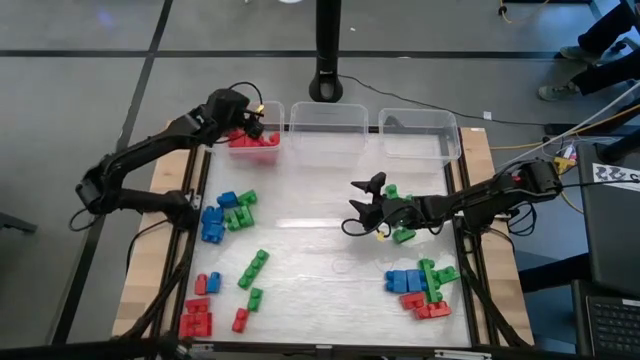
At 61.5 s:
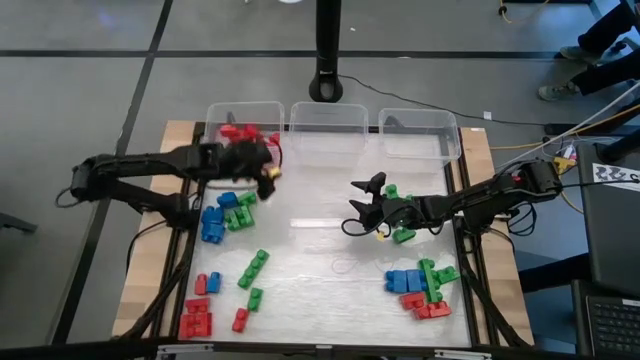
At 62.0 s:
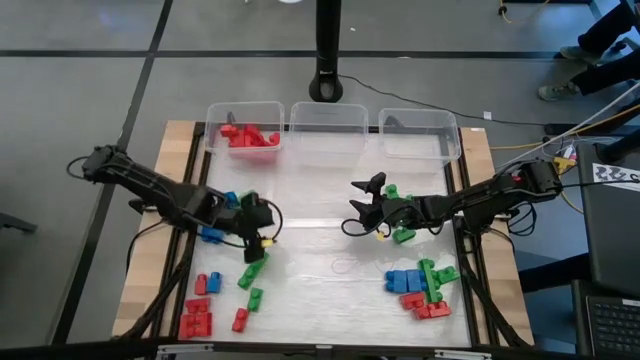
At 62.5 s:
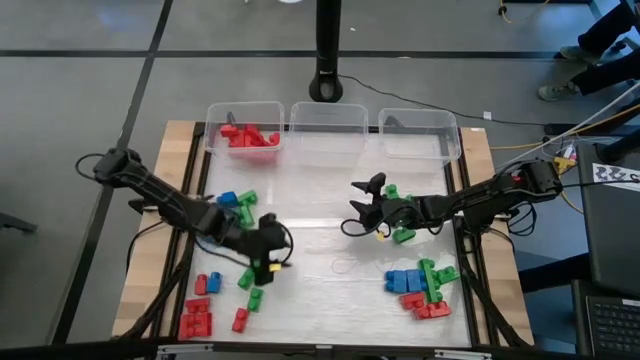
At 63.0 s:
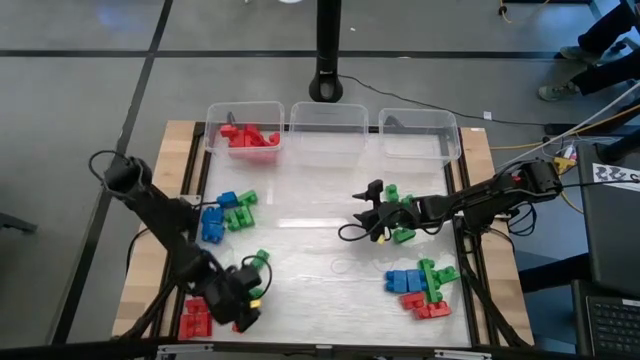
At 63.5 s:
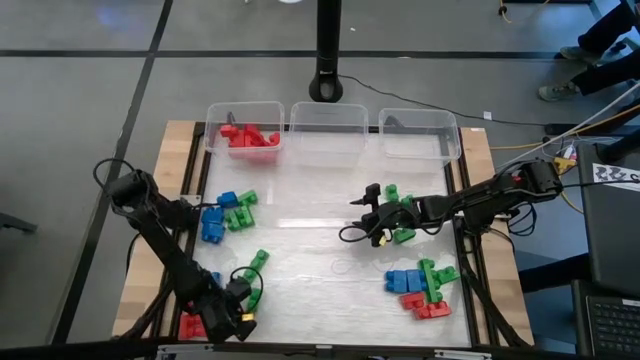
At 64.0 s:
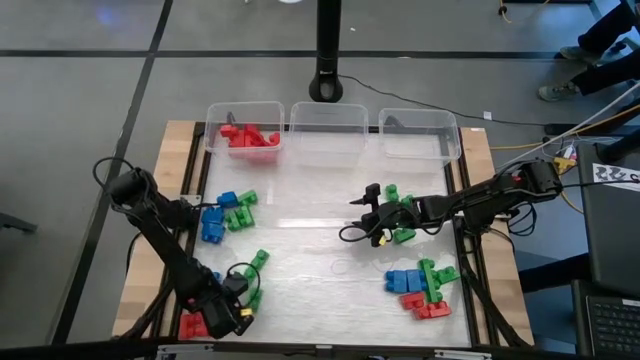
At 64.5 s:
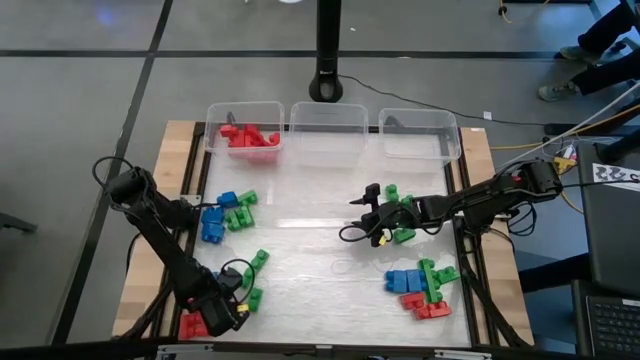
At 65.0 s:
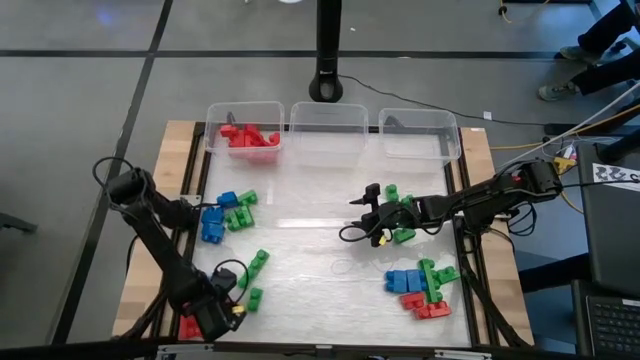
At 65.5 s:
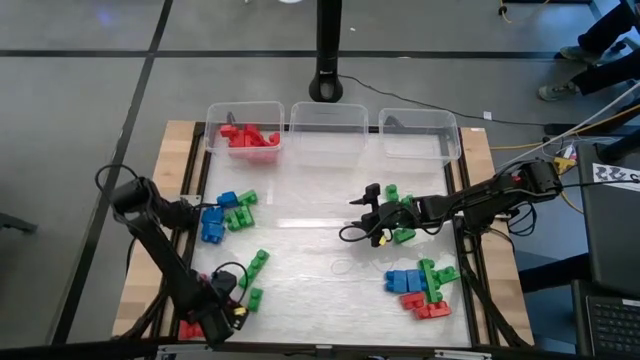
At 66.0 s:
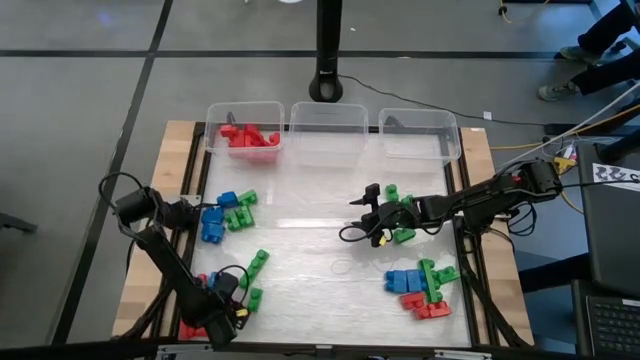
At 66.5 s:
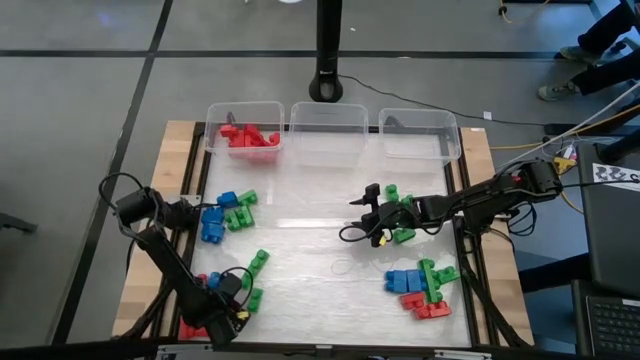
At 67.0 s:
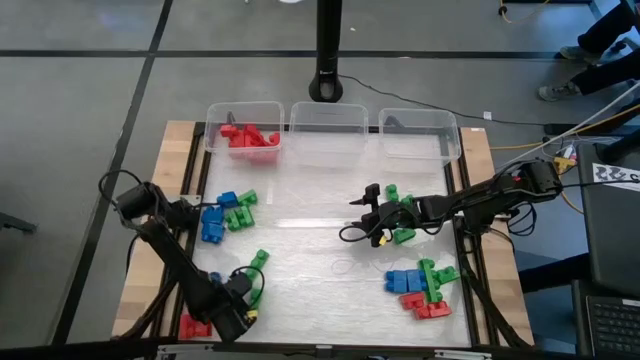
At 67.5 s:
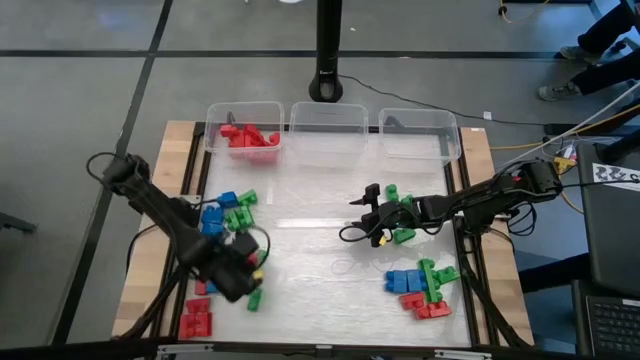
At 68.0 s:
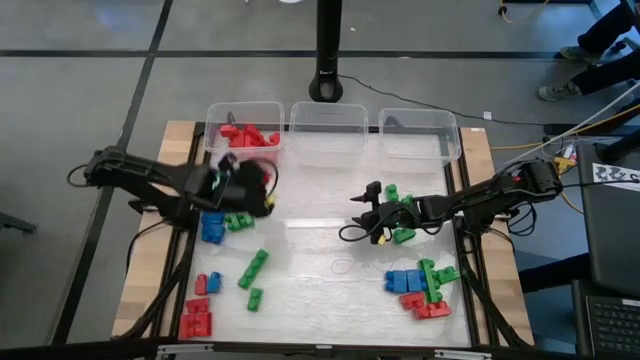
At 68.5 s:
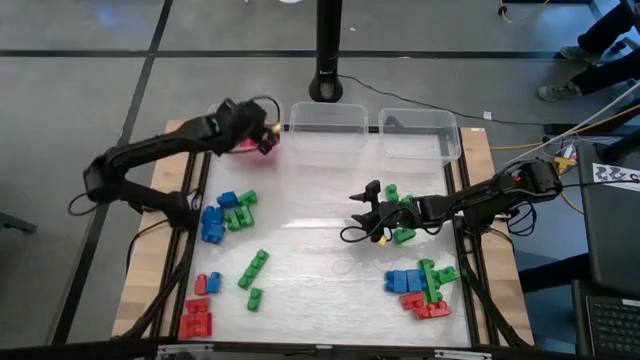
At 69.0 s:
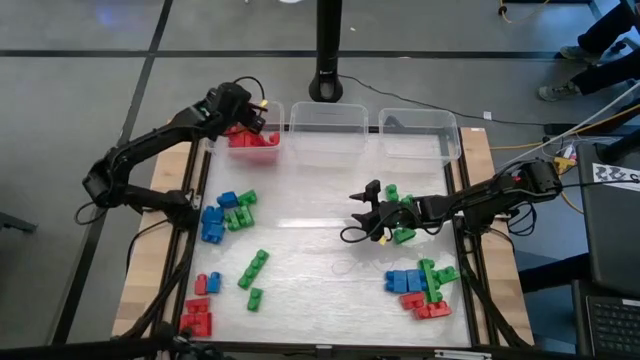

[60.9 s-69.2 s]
Task: Sort blocks
Put the red game piece into the left transparent bin

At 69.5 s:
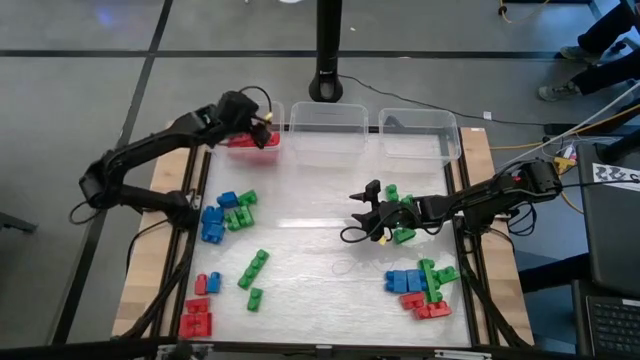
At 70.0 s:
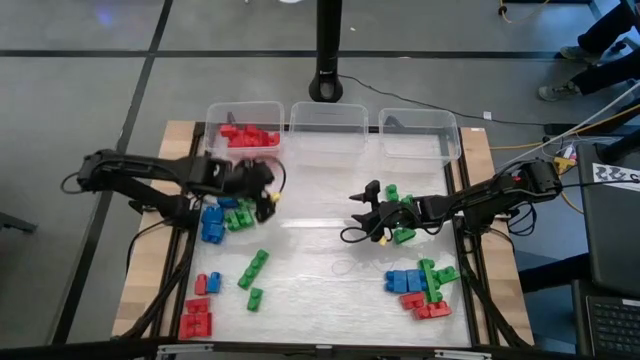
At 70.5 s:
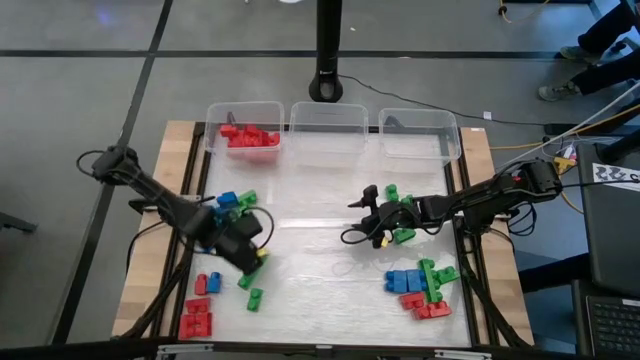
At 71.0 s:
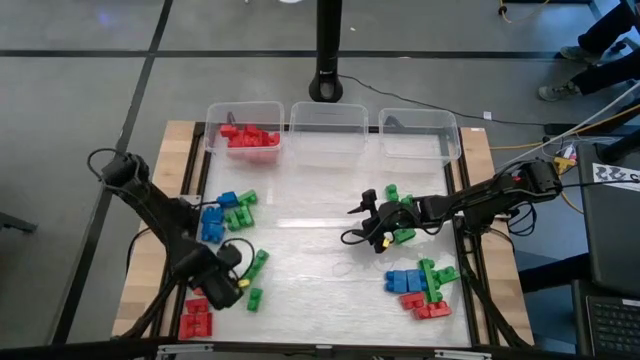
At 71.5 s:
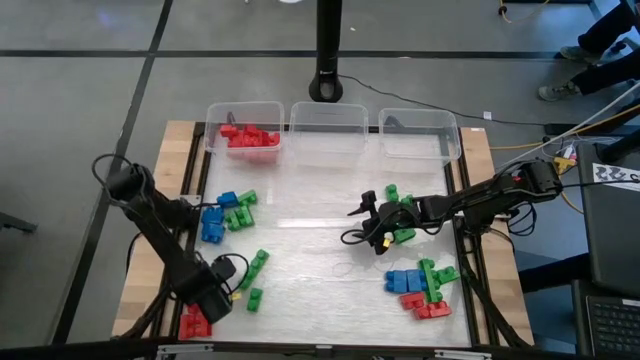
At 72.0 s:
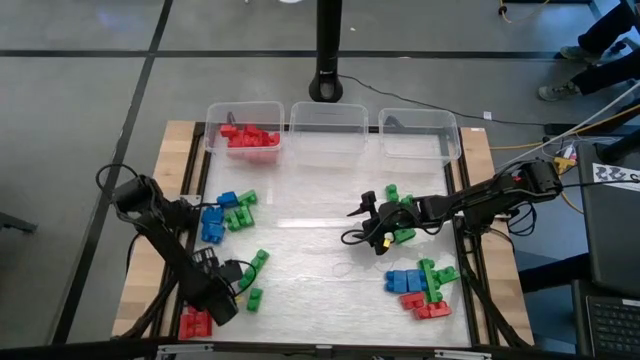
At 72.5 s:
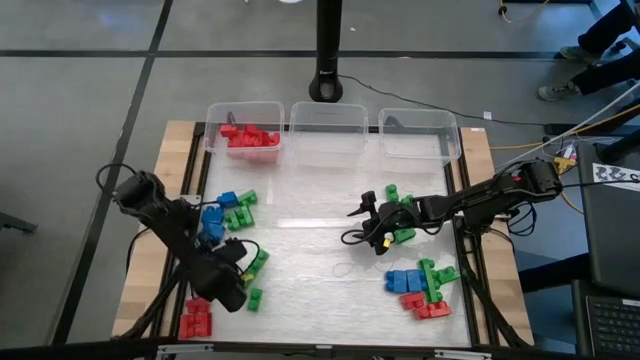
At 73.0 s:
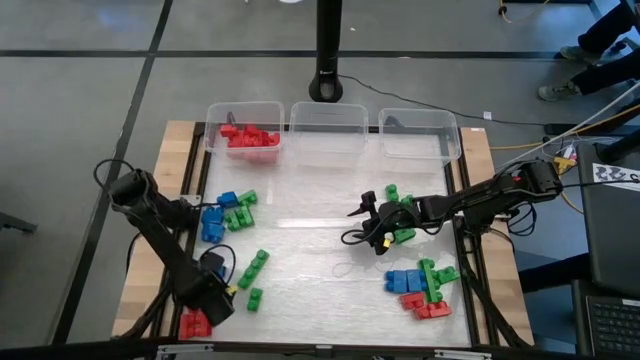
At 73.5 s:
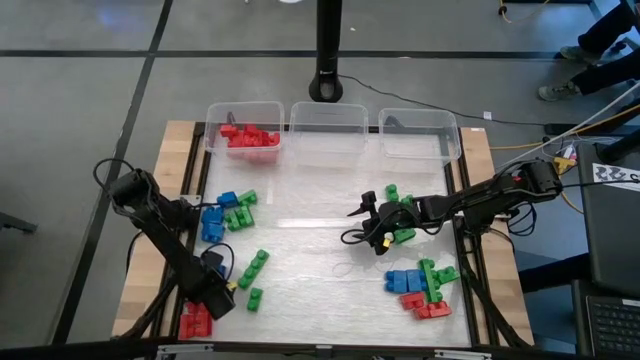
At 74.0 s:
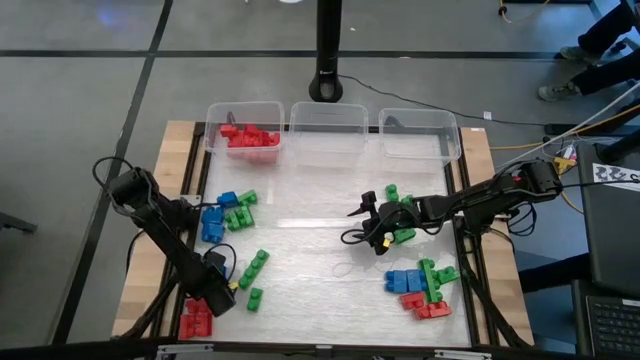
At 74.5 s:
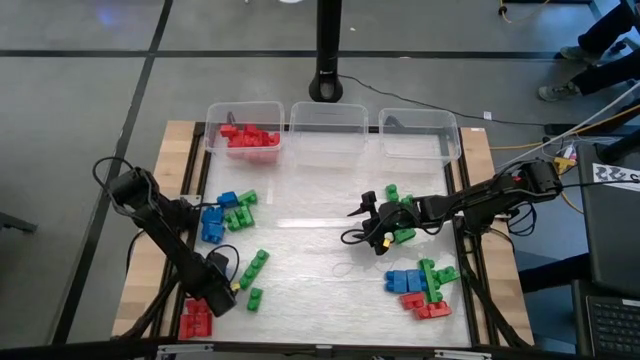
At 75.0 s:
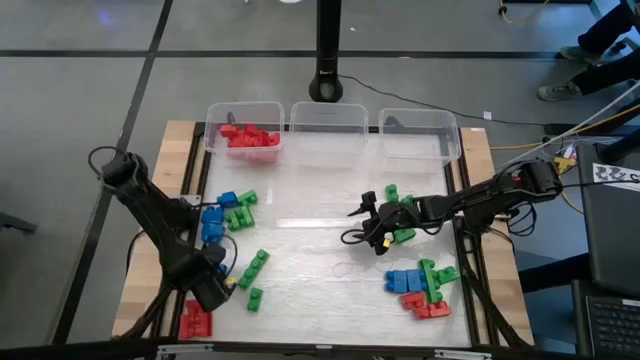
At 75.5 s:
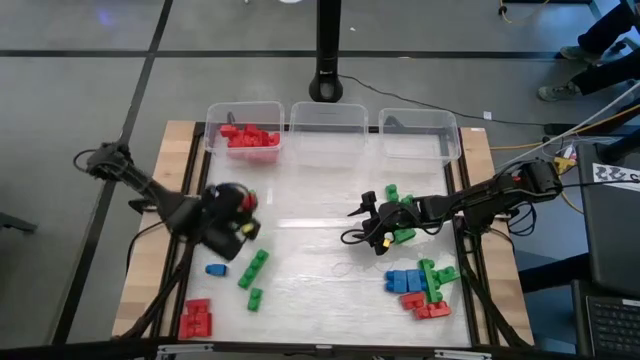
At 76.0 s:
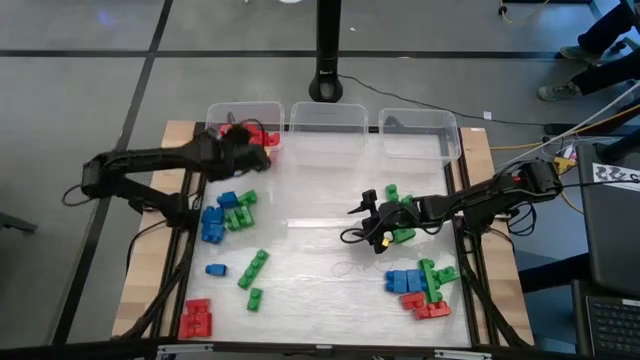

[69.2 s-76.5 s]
Put the red game piece into the left transparent bin

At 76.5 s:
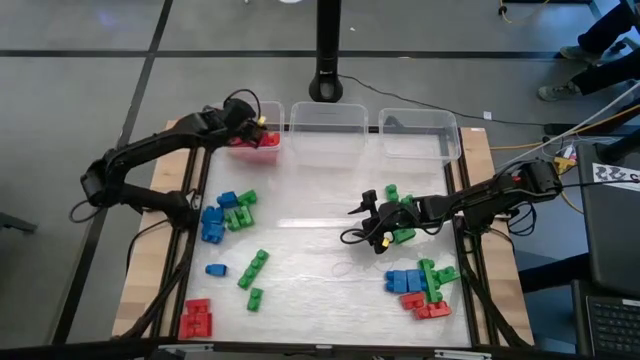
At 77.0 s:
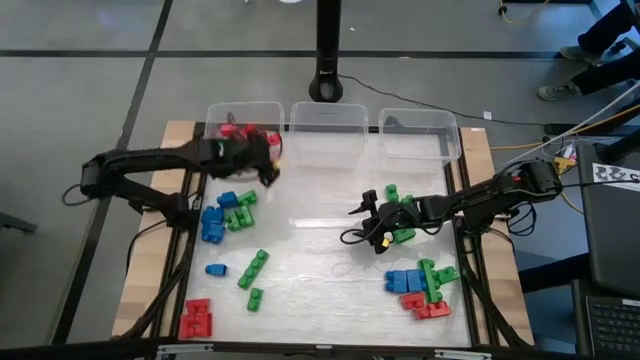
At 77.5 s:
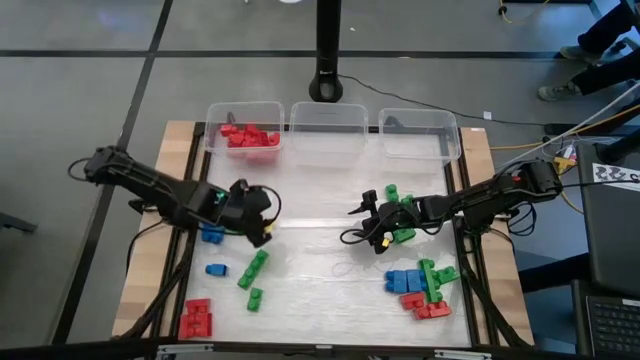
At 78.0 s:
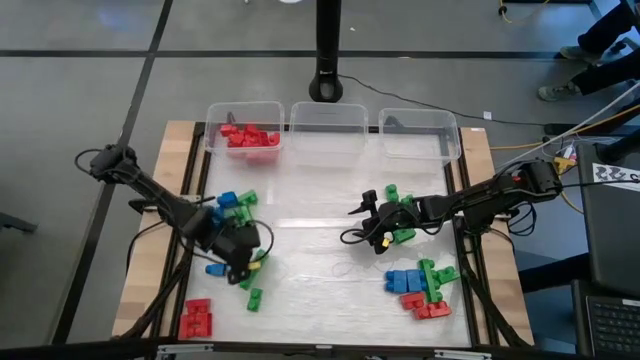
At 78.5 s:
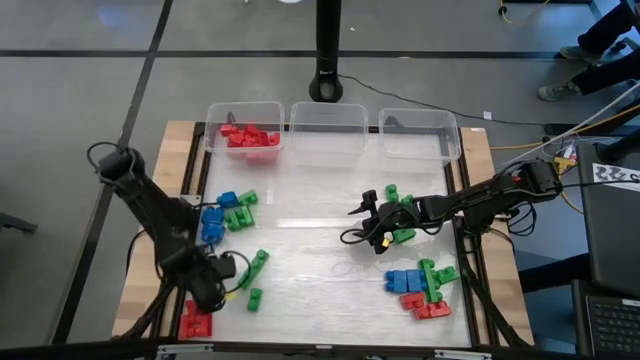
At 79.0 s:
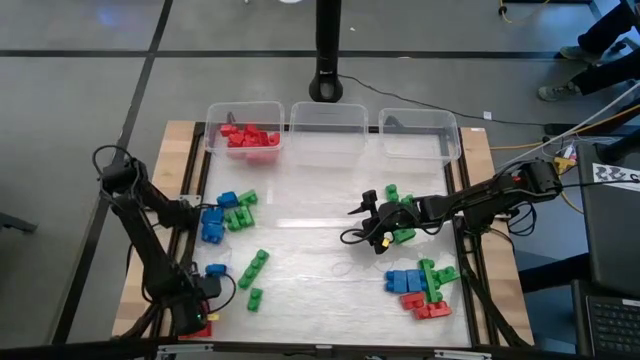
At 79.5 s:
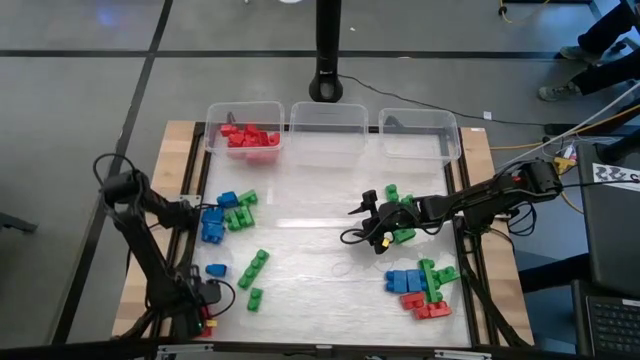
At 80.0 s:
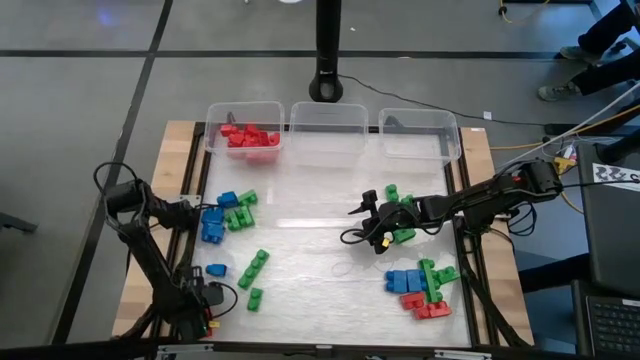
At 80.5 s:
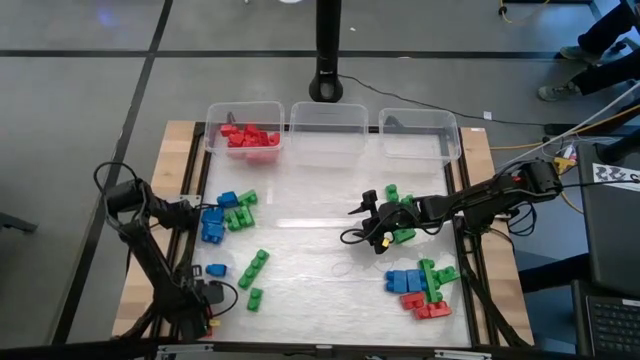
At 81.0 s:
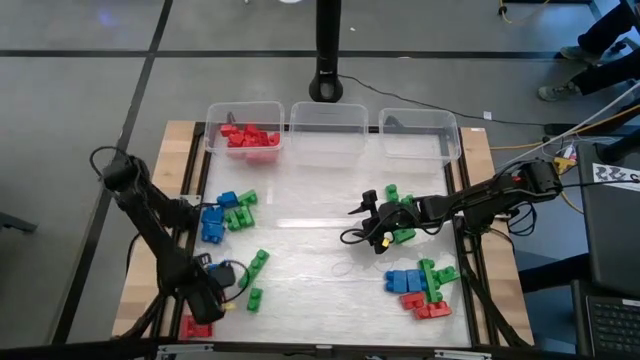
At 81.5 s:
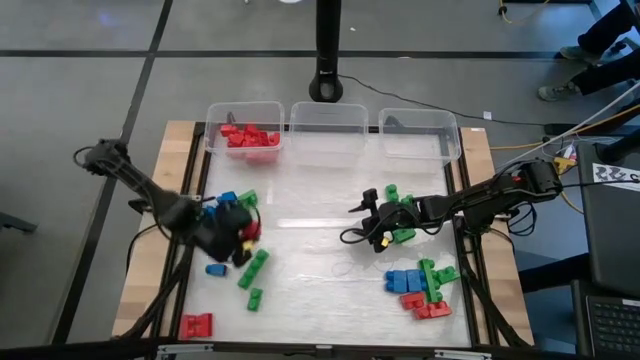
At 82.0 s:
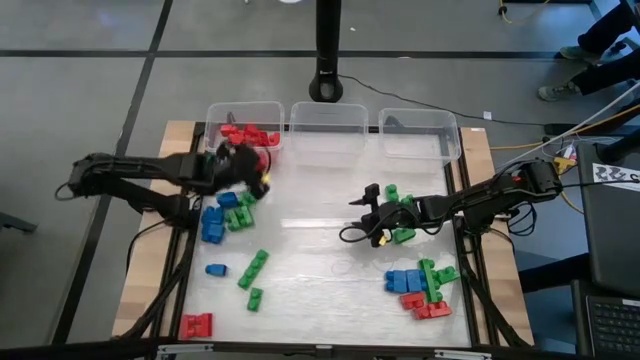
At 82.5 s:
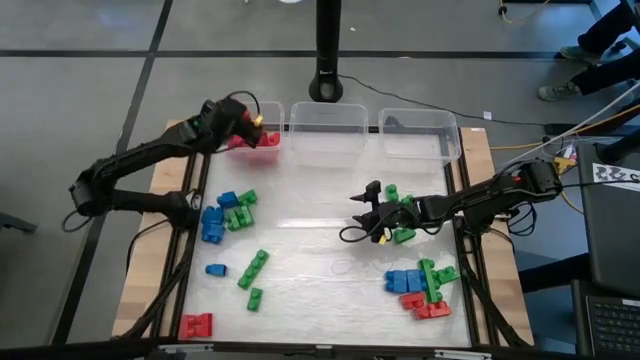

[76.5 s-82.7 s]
Put the red game piece into the left transparent bin
